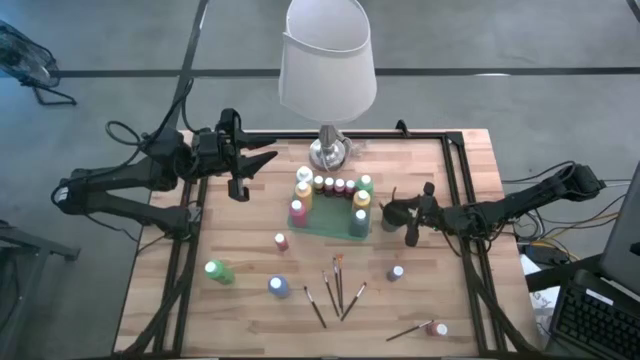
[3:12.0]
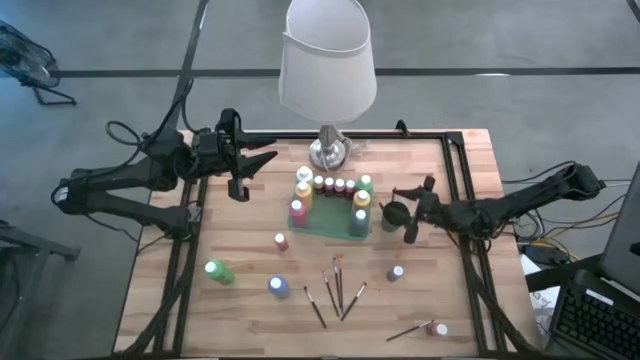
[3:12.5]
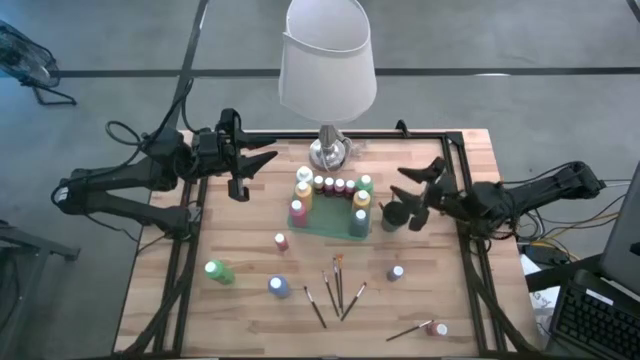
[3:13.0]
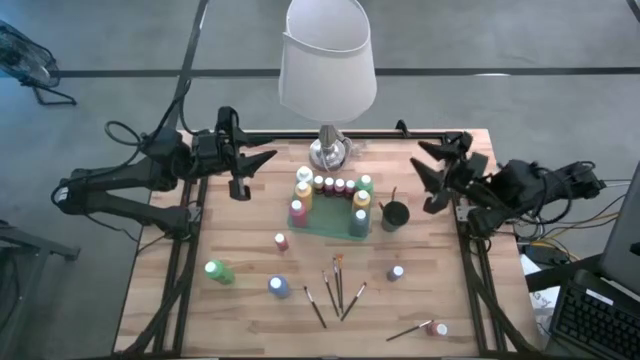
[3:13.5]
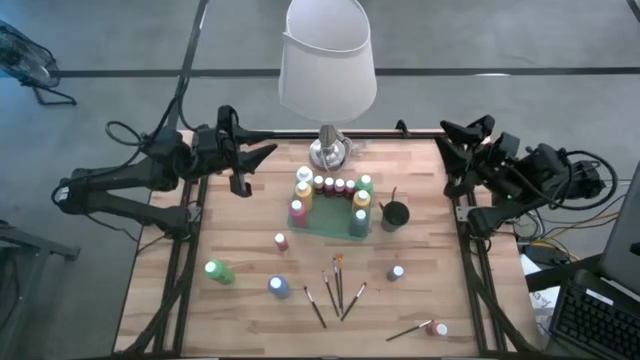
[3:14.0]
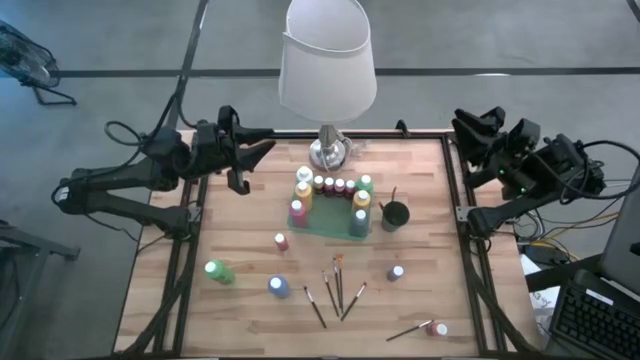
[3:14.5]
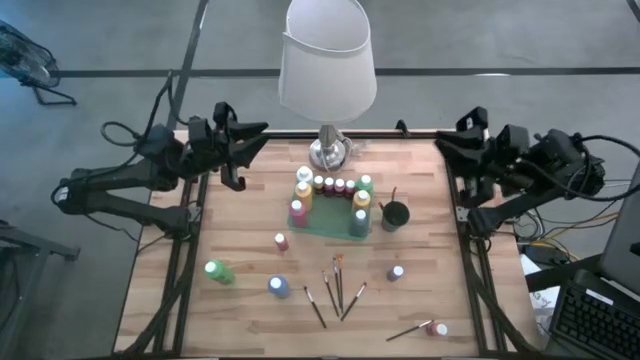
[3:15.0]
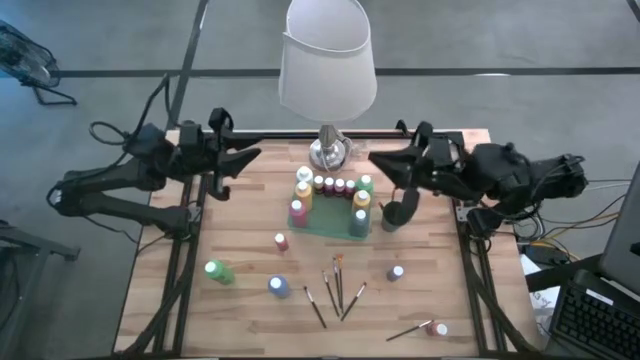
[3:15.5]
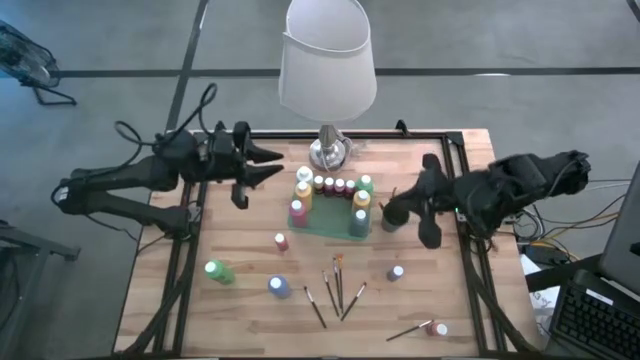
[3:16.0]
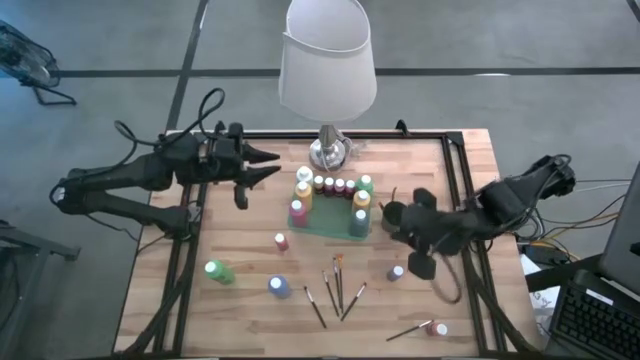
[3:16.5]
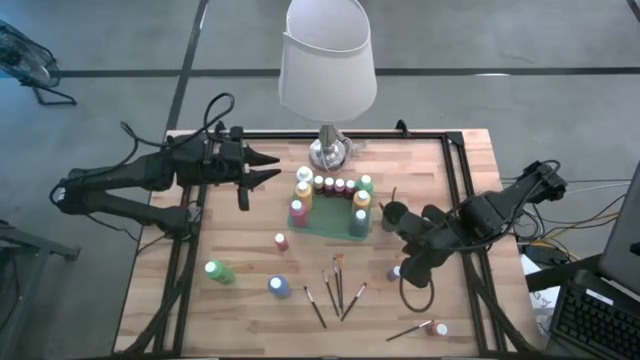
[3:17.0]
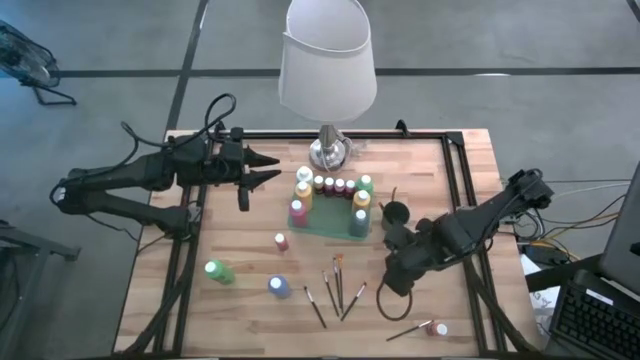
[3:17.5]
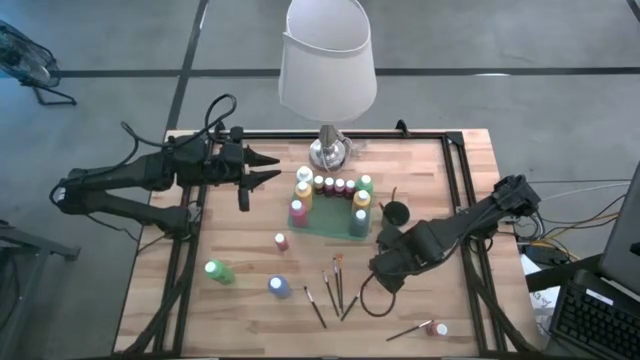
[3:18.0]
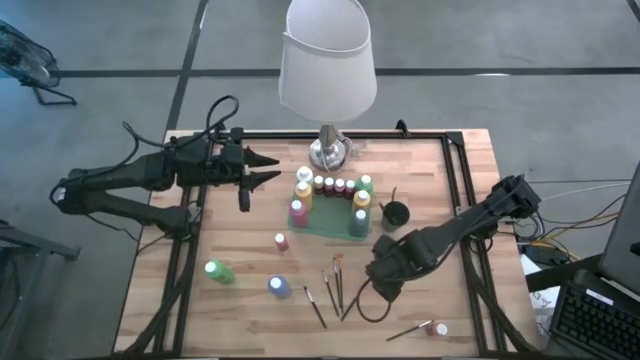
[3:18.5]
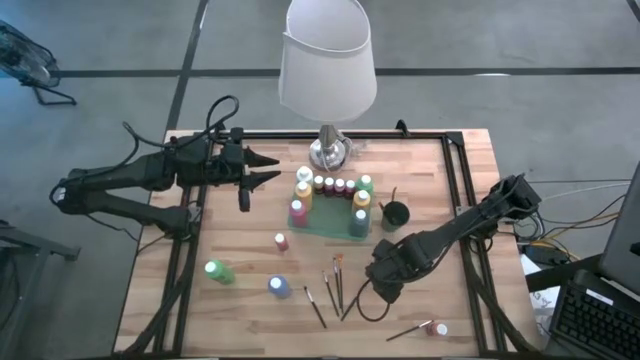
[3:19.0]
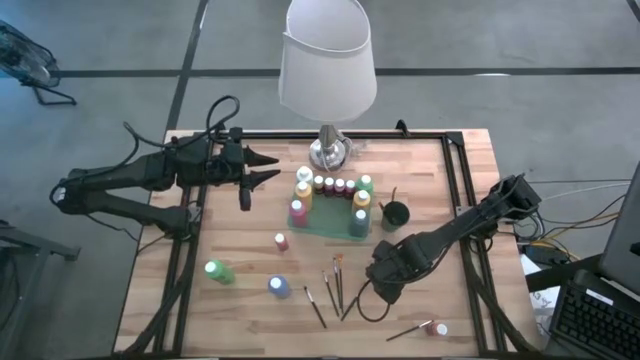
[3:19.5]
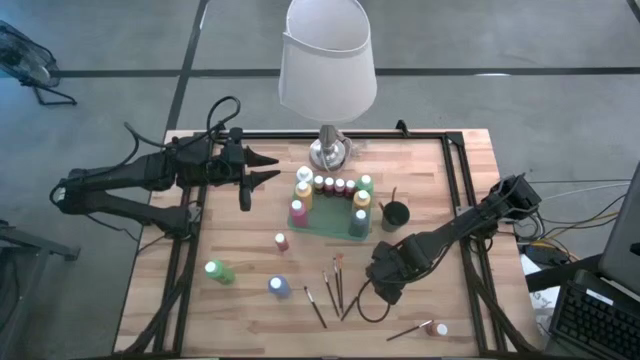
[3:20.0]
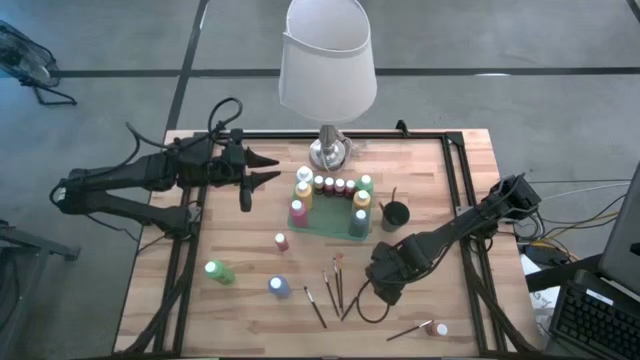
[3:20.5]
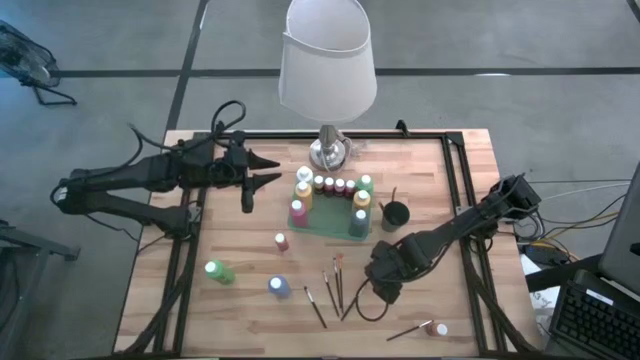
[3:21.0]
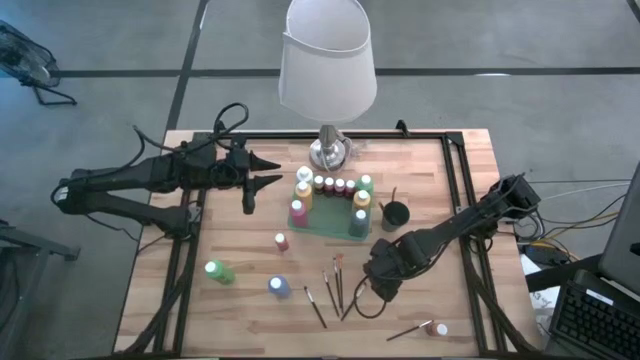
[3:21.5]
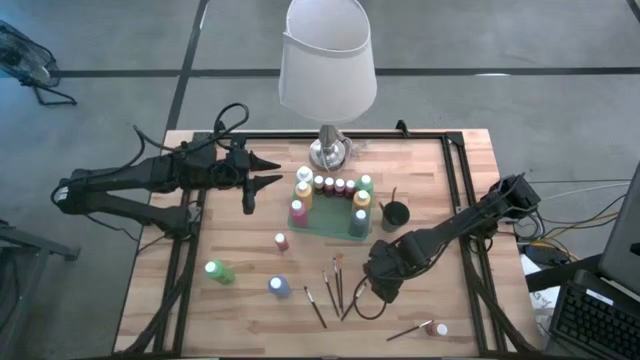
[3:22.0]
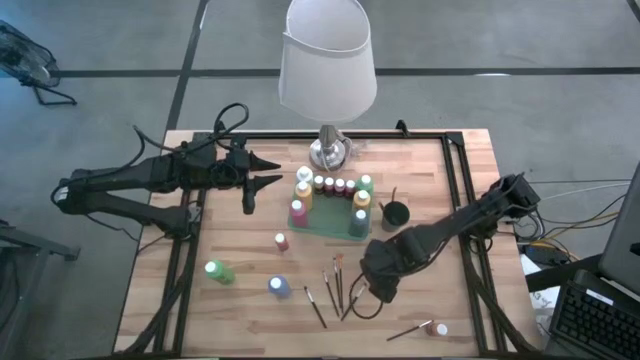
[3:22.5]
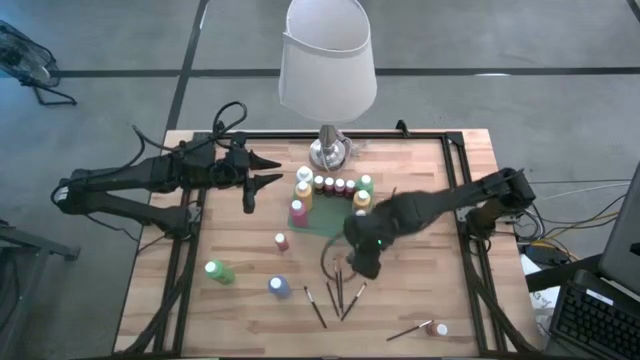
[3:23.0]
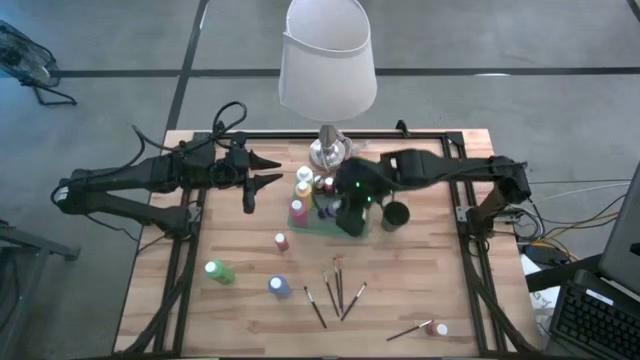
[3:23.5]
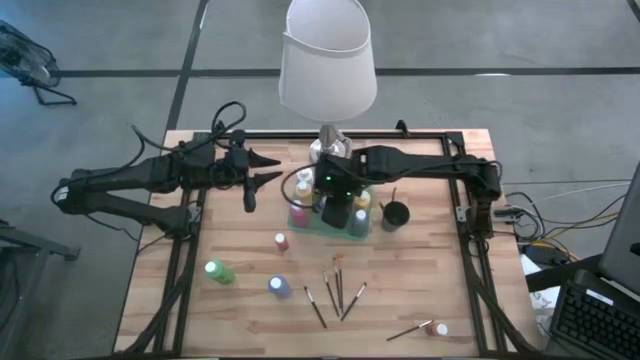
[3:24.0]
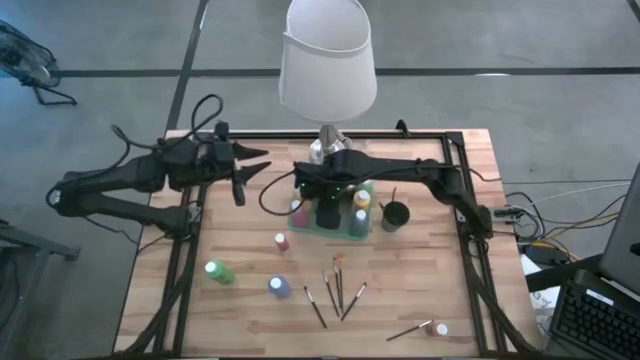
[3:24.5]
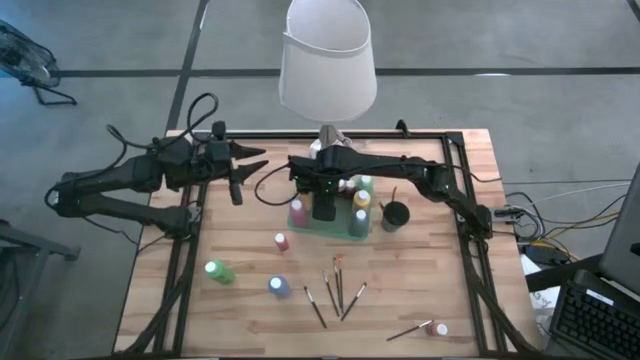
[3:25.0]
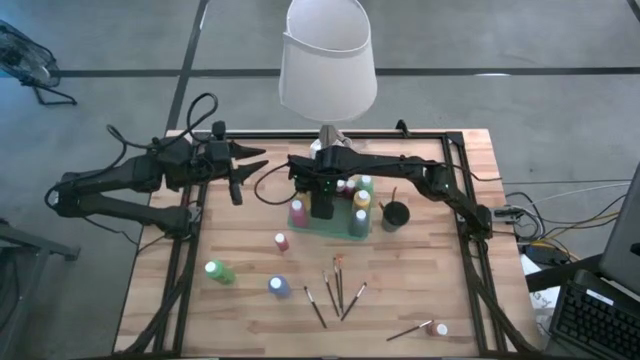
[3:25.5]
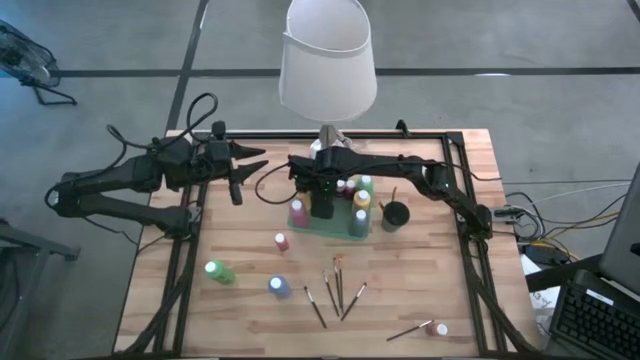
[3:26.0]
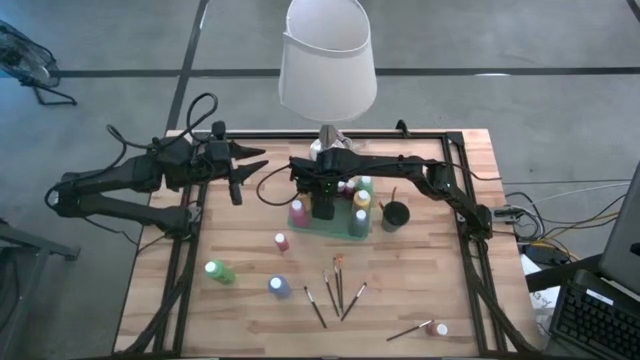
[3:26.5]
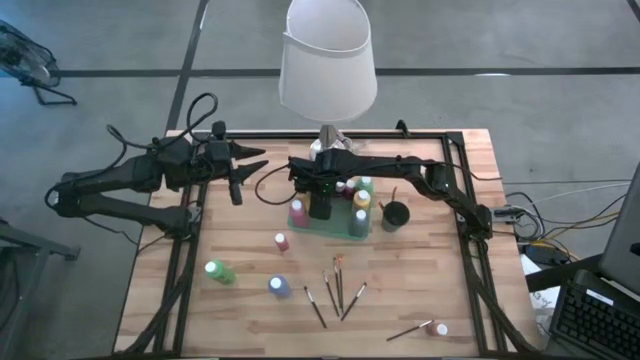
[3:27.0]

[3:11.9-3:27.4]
Task: Pick & Place Paint Supplies
Put the blue paint bottle into the green bin

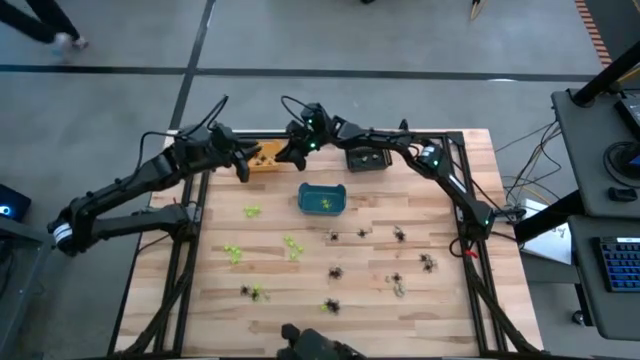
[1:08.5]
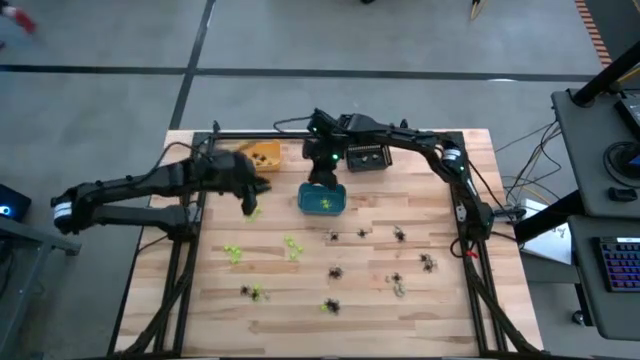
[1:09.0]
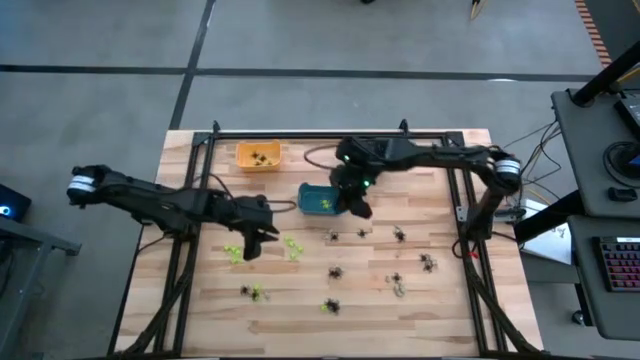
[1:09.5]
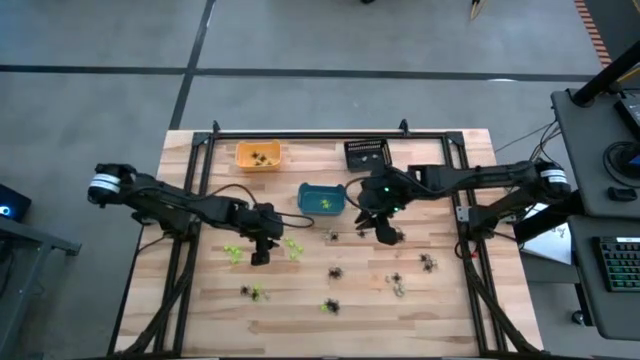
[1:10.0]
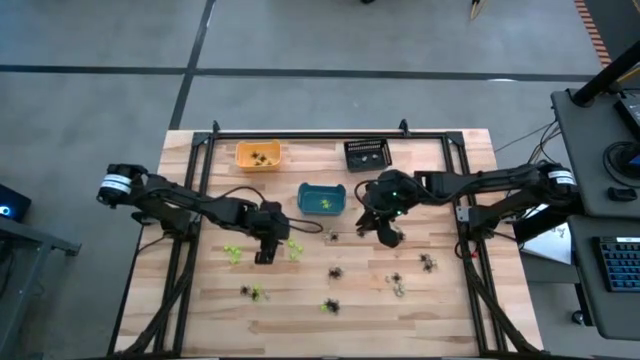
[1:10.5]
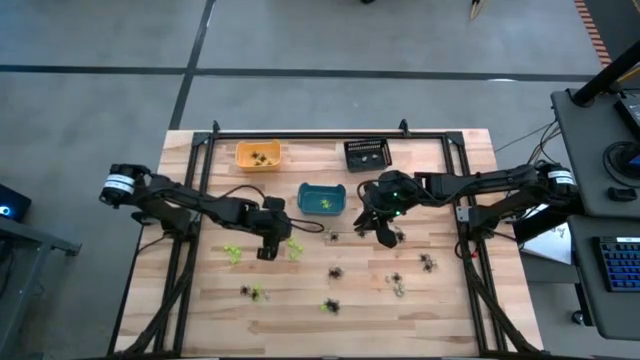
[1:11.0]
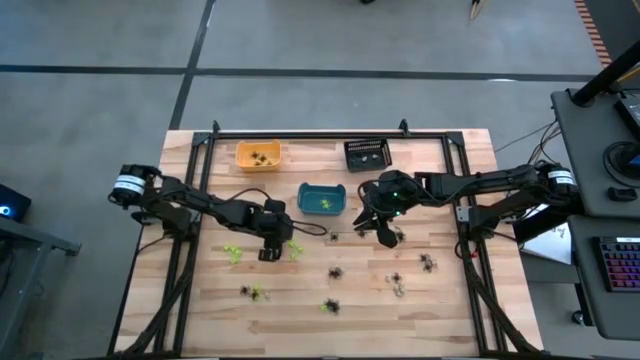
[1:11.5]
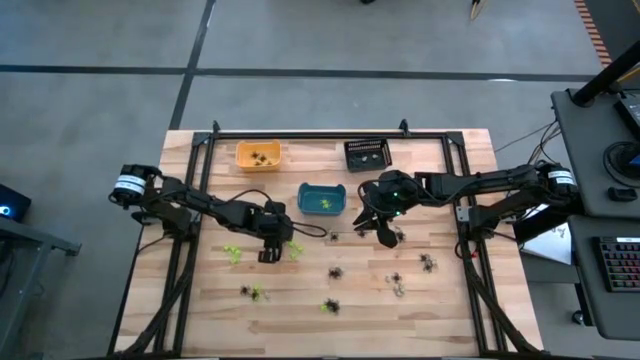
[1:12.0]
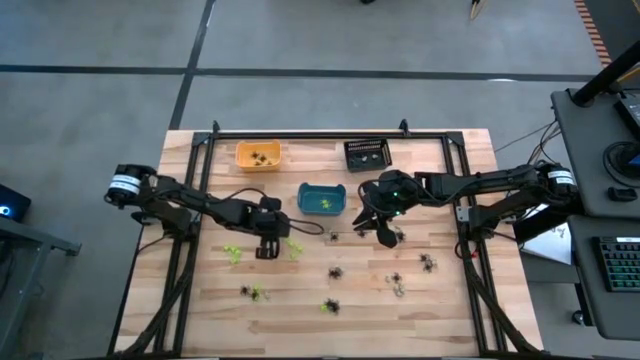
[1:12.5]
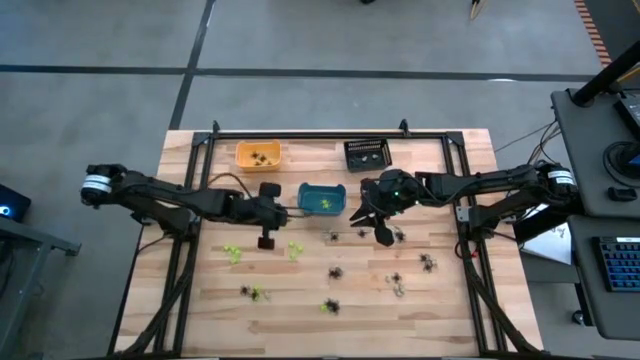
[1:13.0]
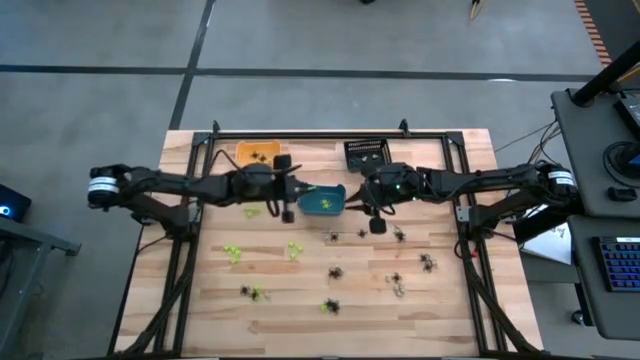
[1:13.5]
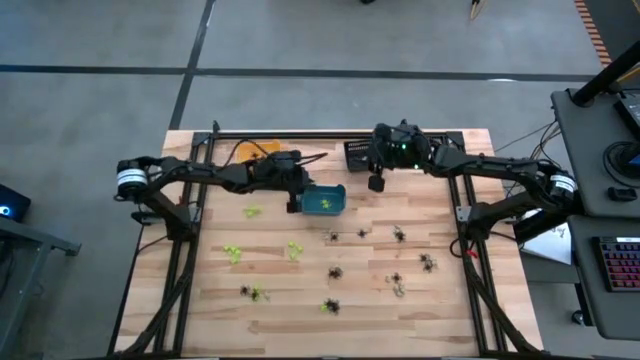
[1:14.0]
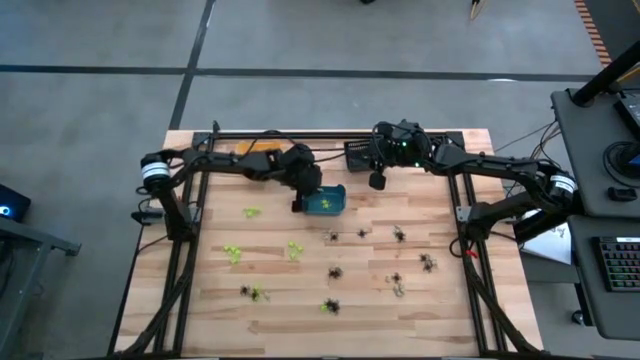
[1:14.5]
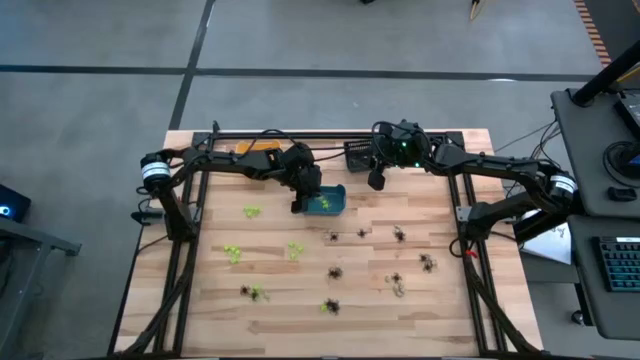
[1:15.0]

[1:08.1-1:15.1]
Task: Sort Halloween decoration
Put the green spider toy into the blue bin
